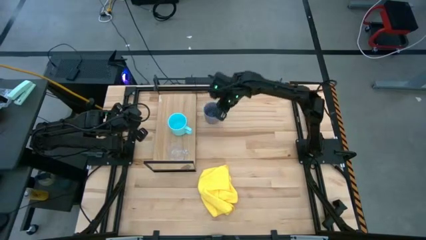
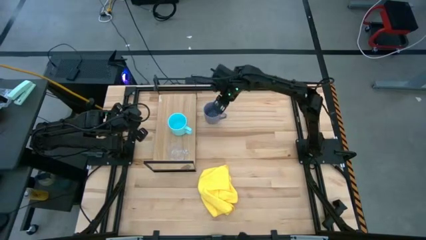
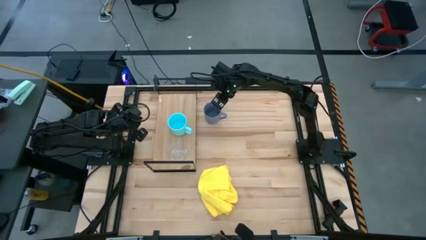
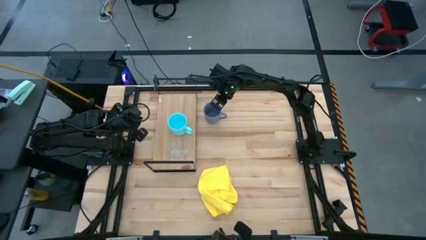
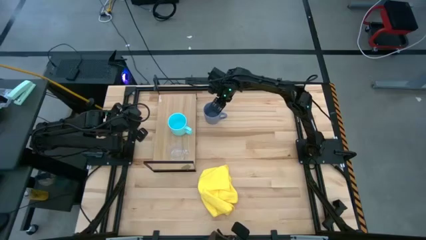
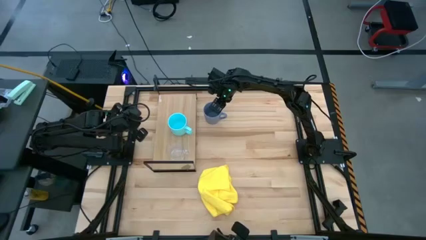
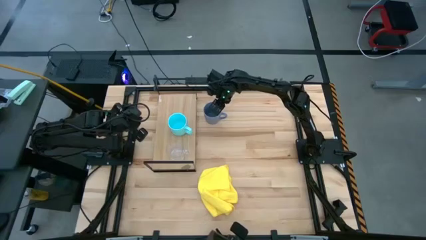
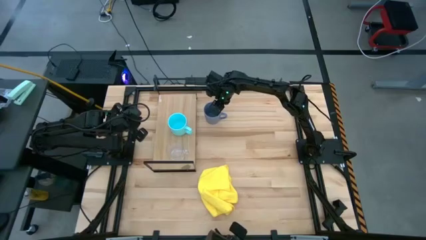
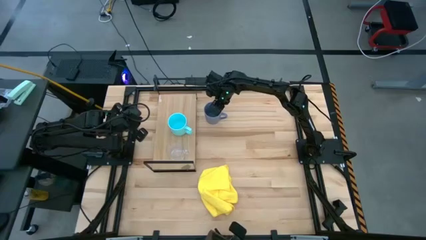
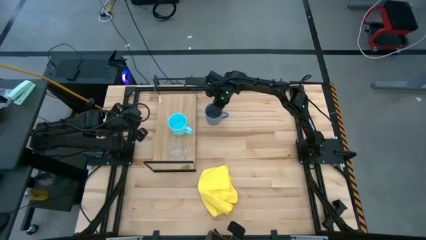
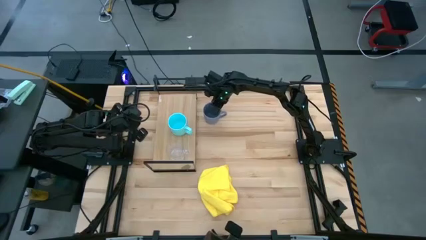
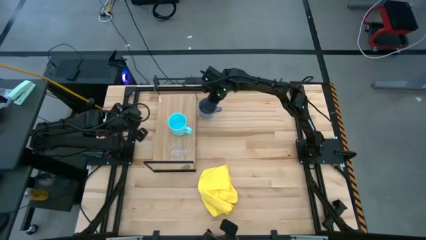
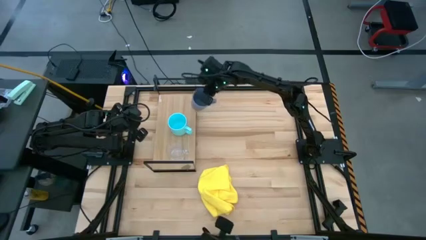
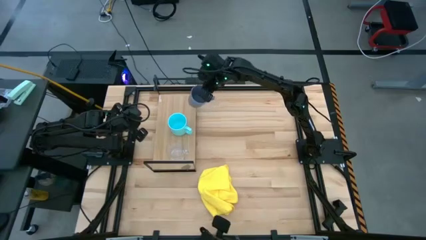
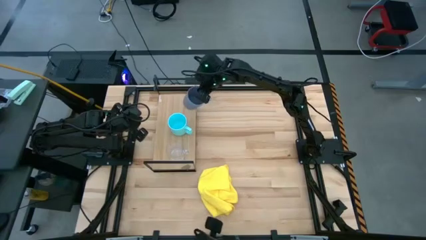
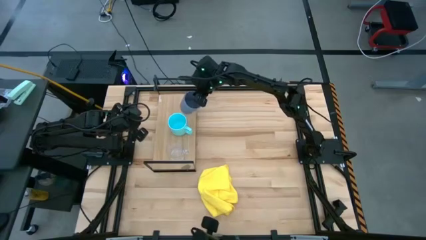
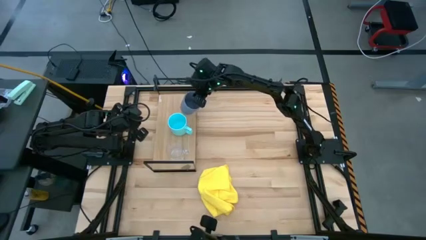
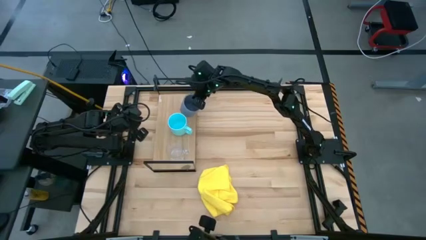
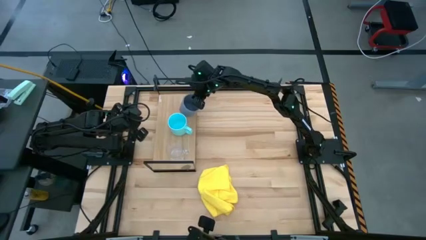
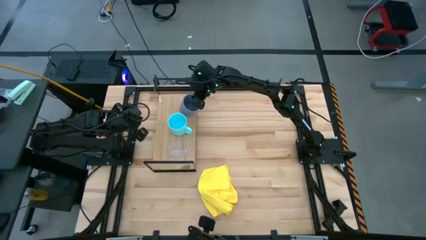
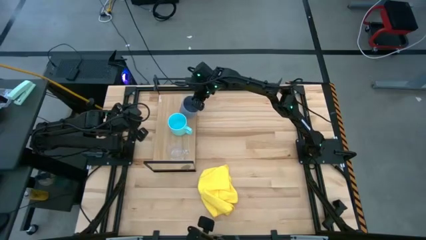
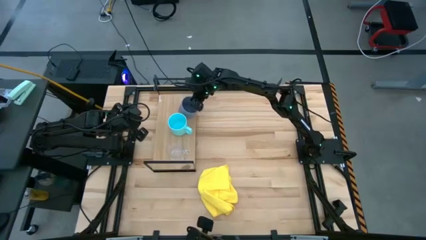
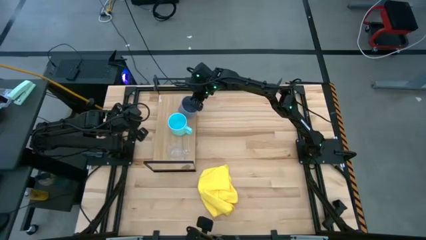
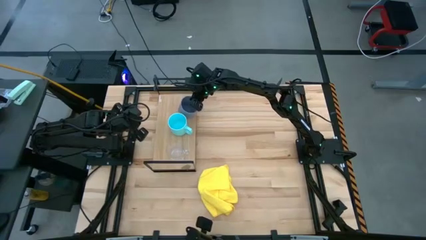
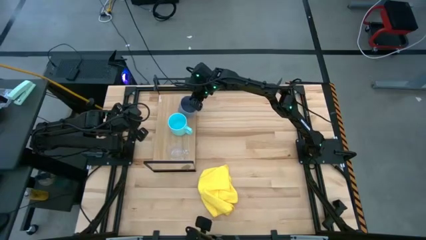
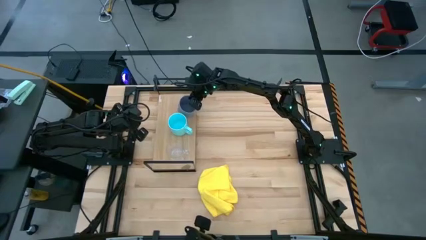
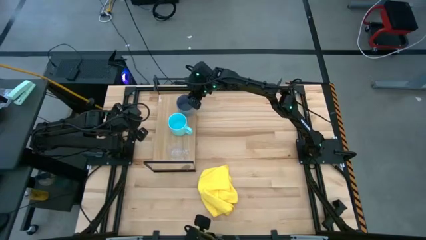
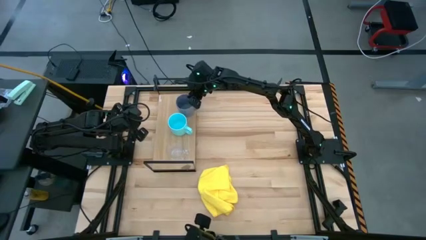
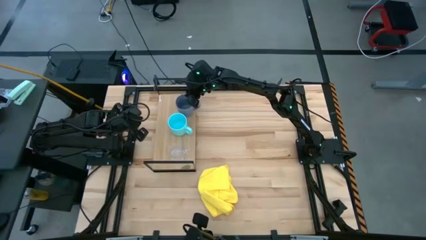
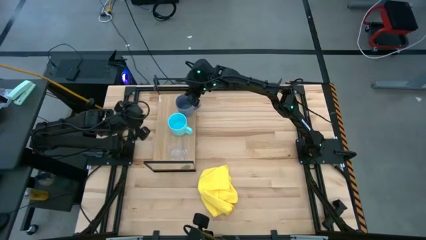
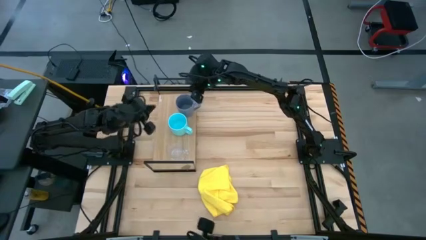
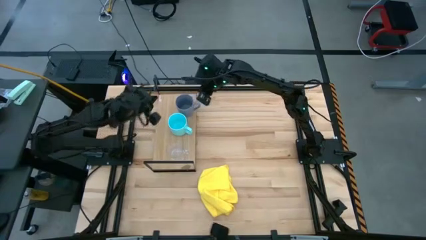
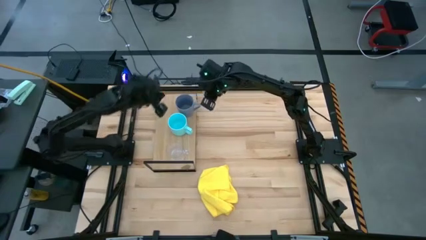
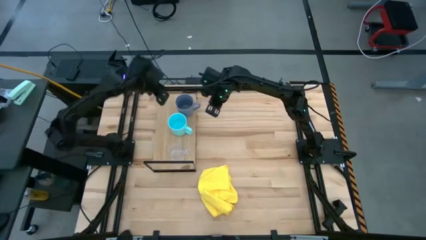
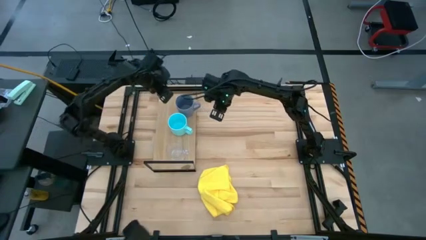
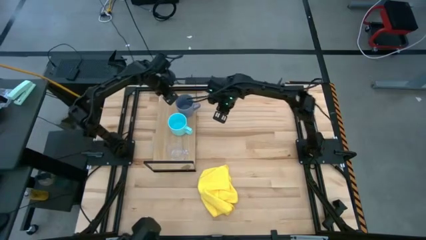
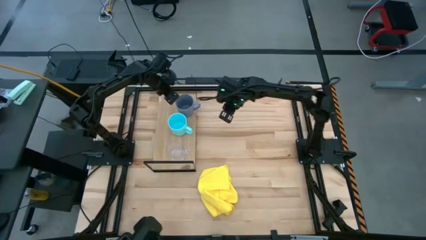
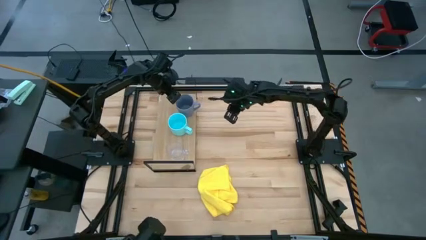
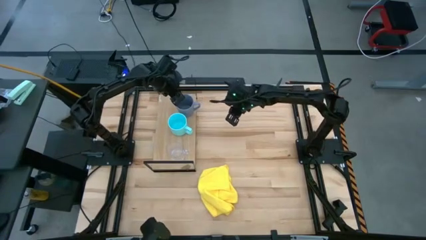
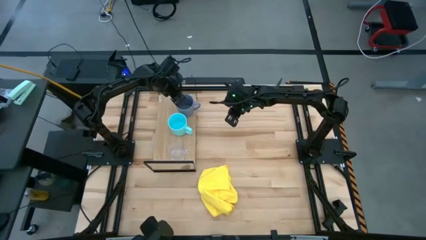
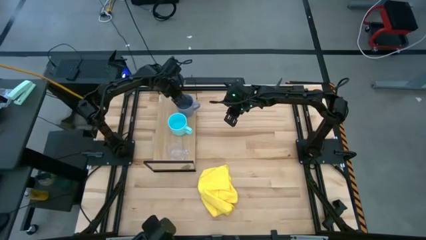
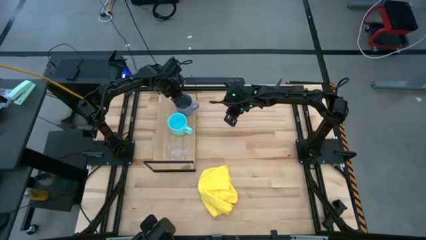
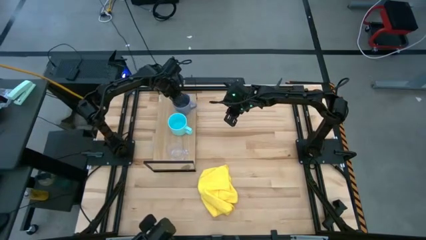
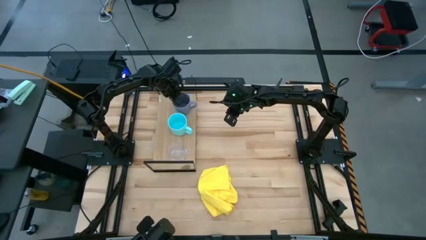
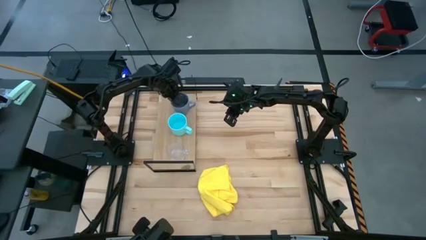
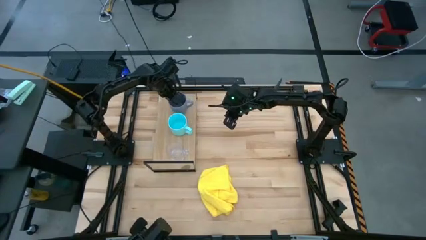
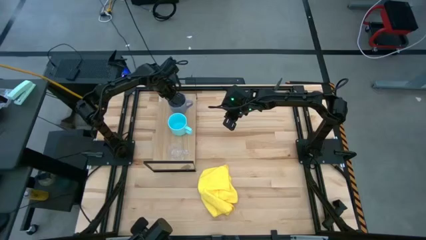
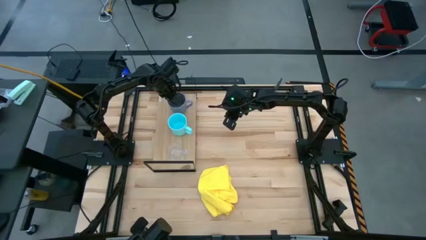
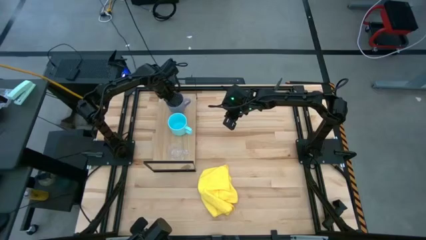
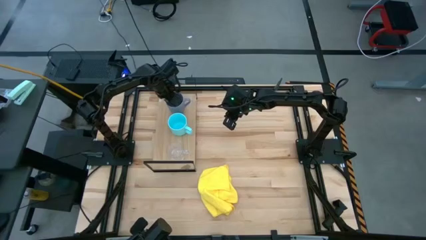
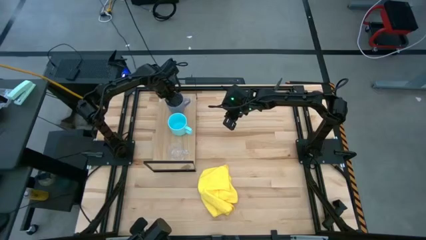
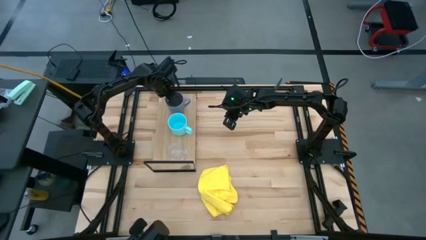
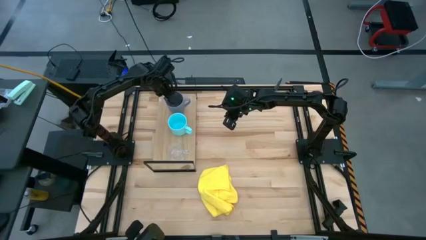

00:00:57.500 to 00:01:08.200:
Task: Stack small to large cups/mugs on shelf
Put the dark blue on the shelf

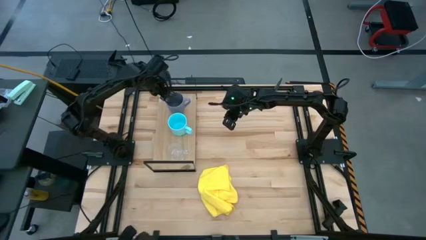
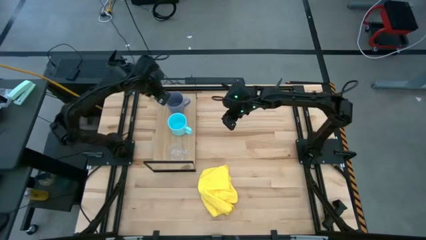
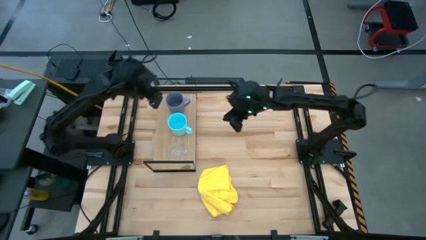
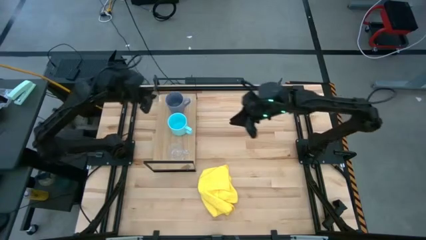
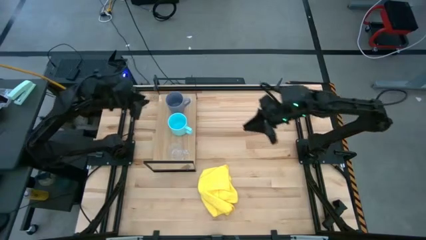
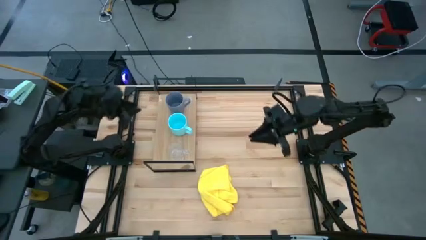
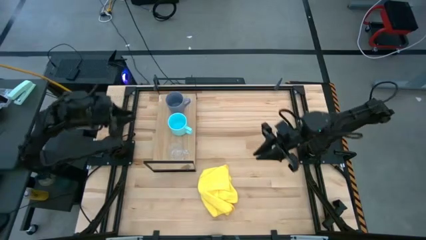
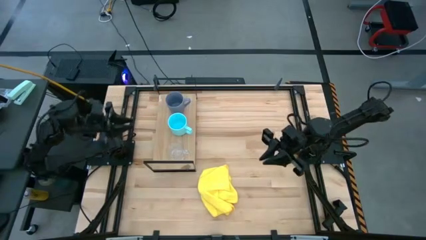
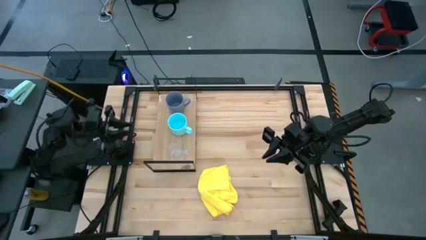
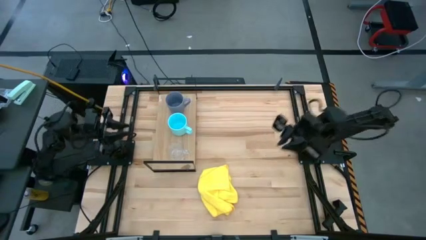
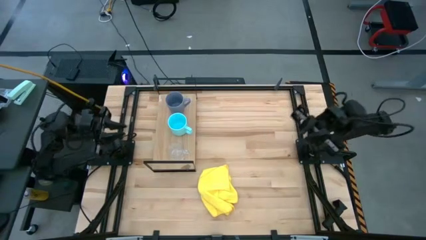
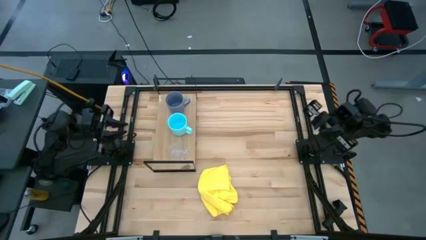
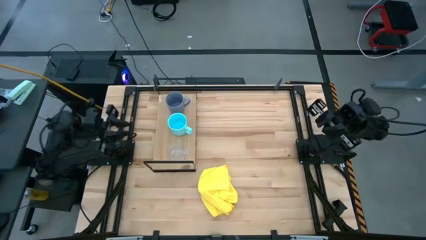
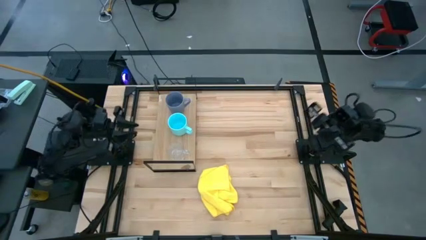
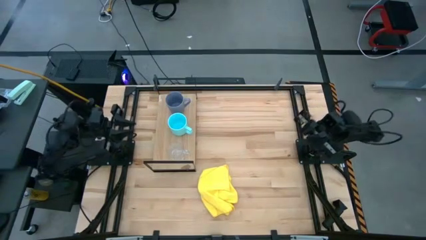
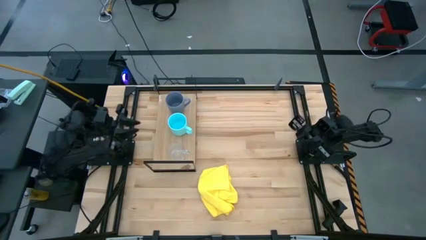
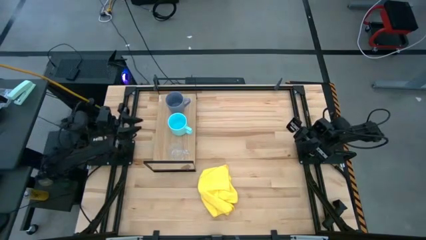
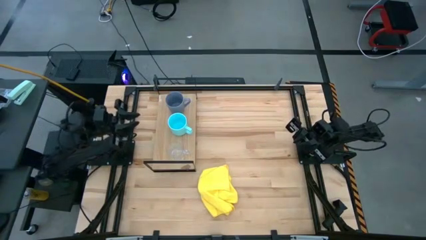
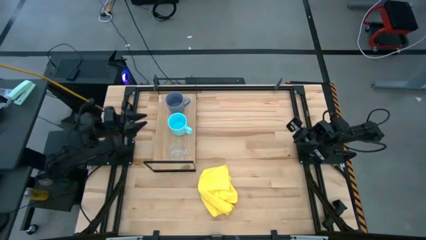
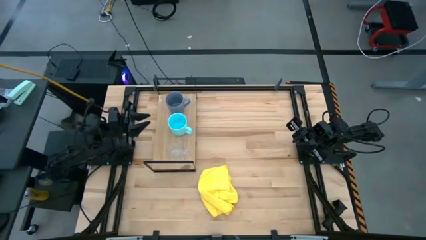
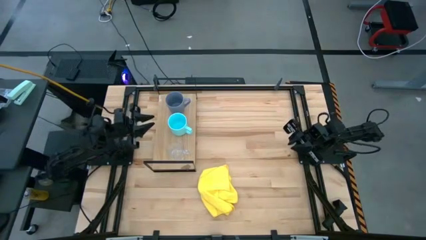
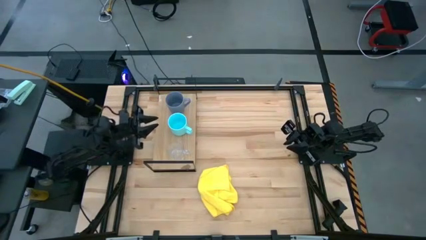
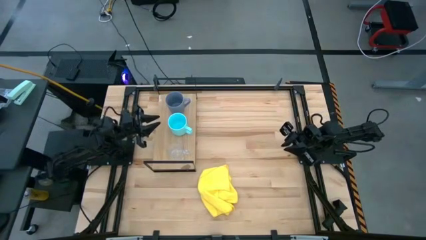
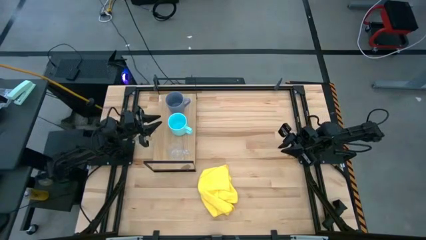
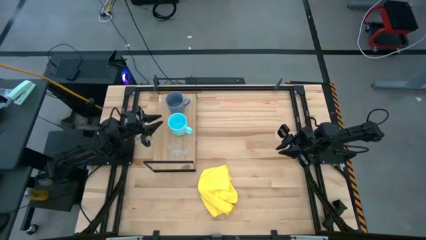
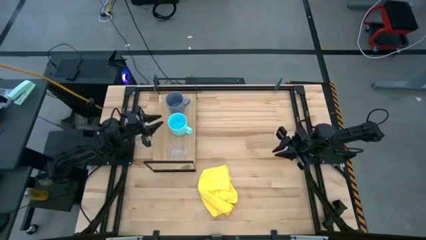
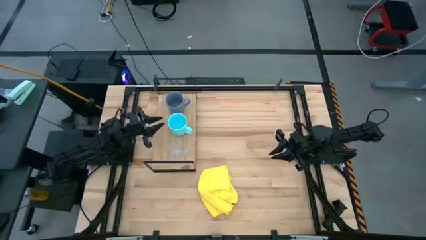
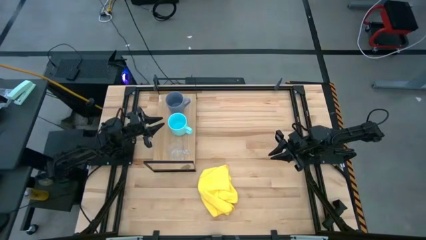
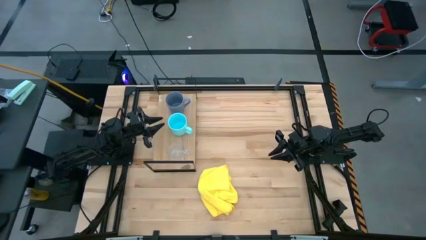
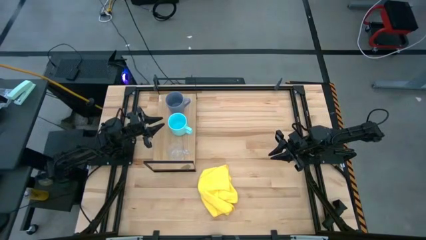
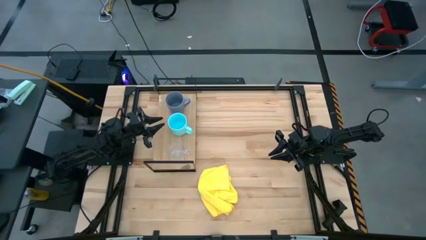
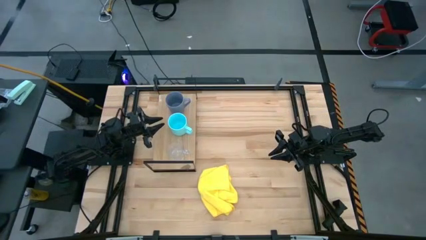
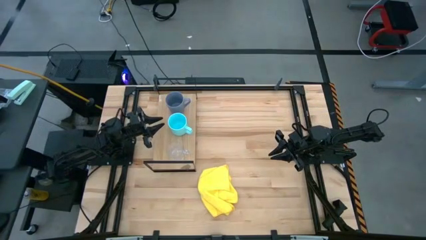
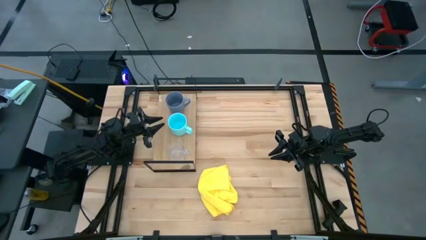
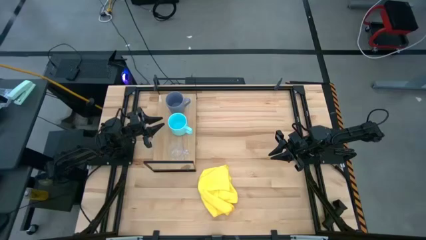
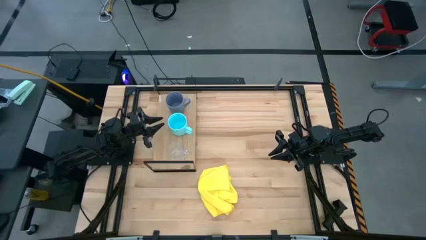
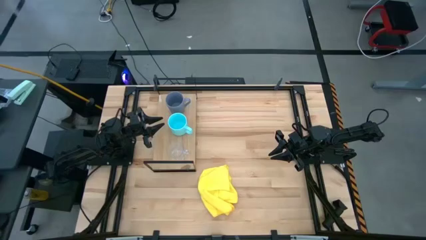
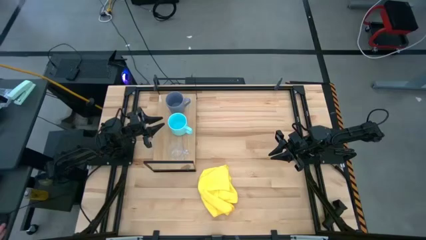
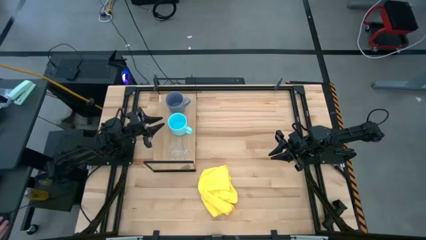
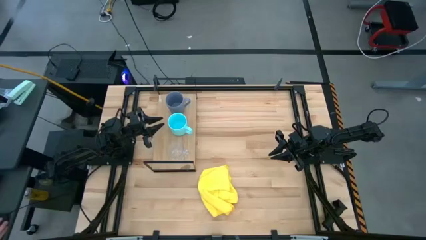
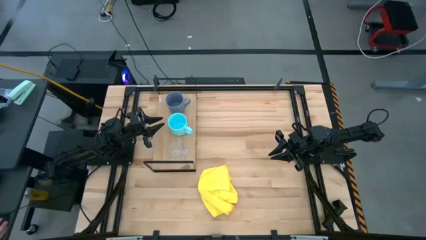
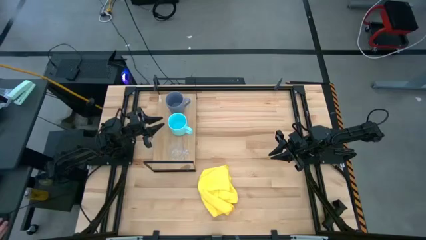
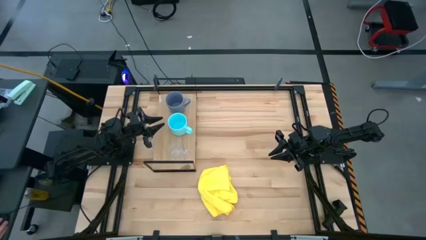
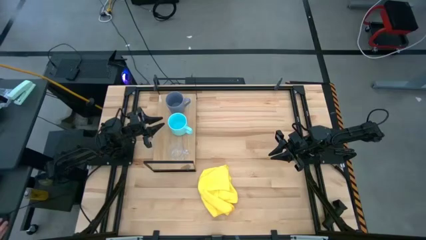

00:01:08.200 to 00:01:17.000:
Return to Home Position
